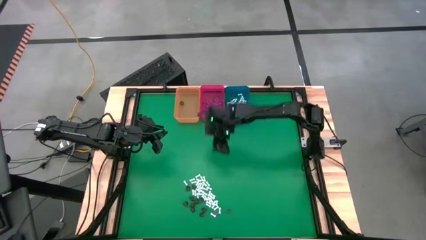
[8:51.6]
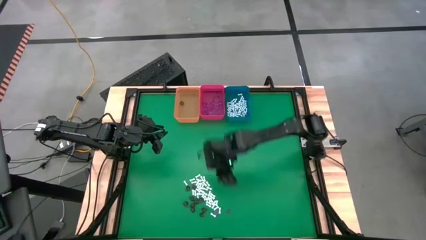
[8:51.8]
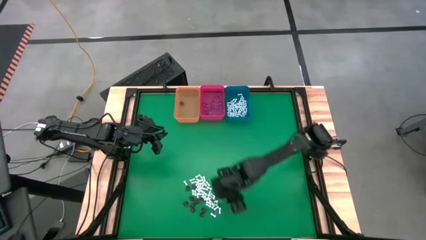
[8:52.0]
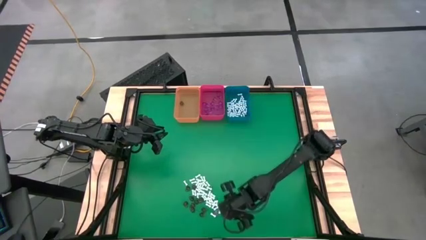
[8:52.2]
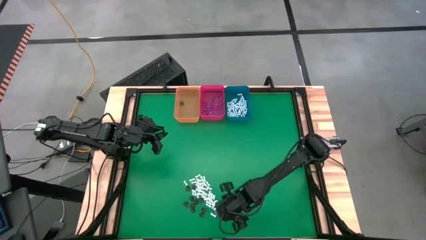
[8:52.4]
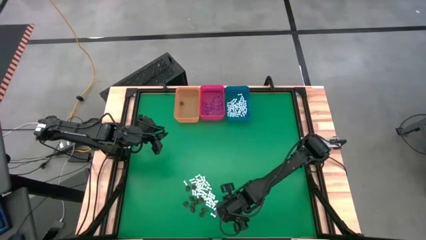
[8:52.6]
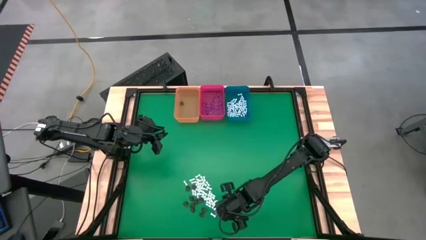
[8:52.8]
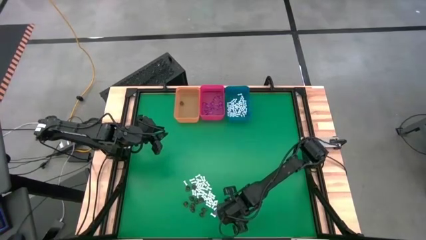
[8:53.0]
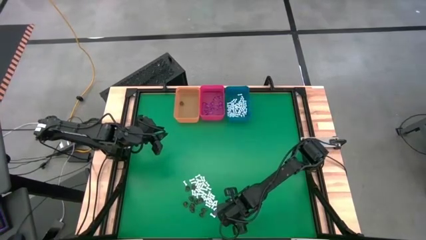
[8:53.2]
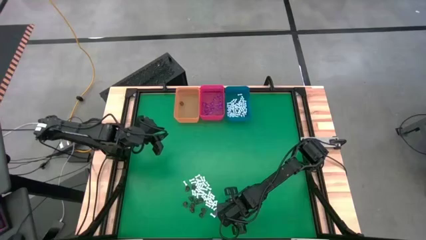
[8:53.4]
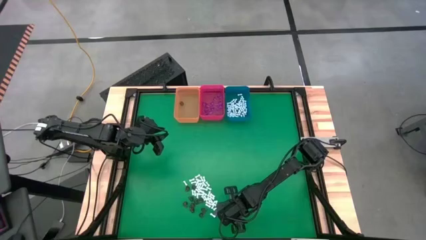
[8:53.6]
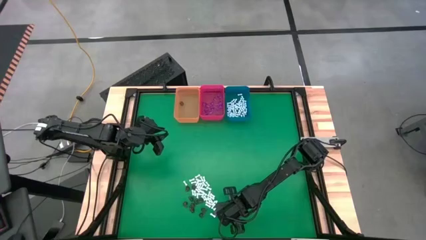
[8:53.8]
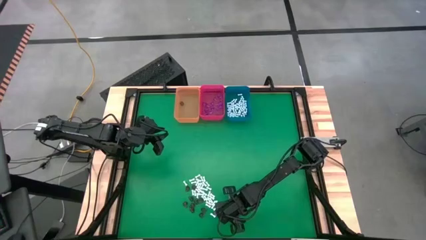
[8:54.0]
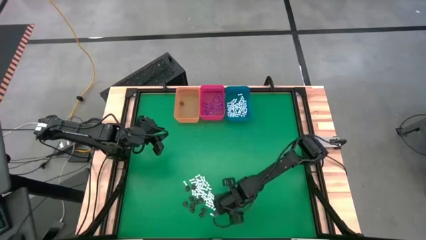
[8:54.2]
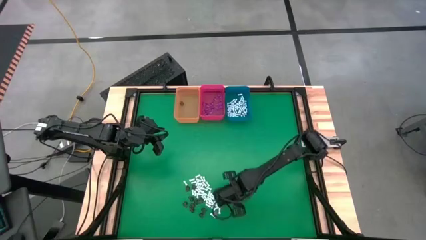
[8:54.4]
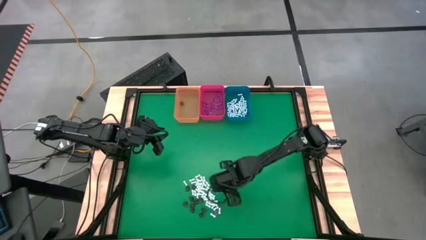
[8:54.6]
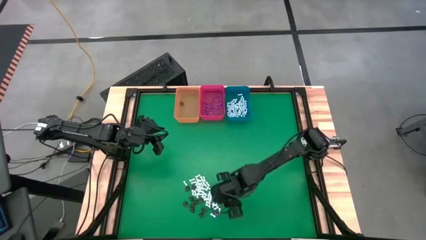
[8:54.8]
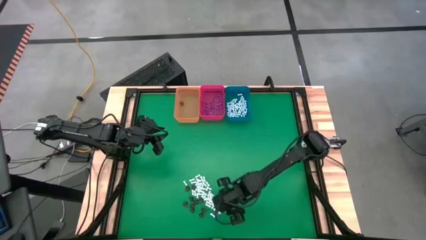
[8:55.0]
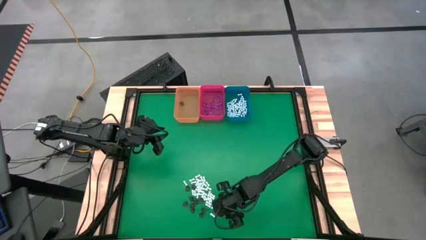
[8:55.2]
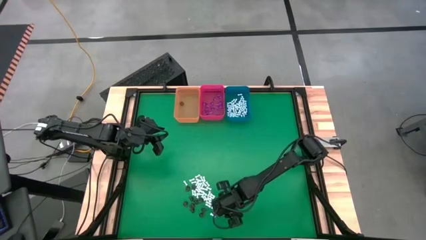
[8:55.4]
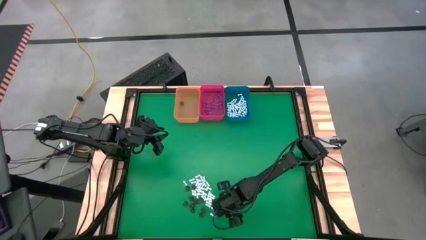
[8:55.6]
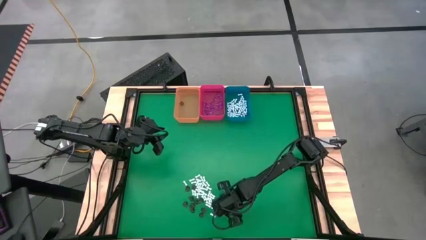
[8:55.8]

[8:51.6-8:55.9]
Task: Sort Halloween decoration
Put the right violet witch hat toy into the red bin

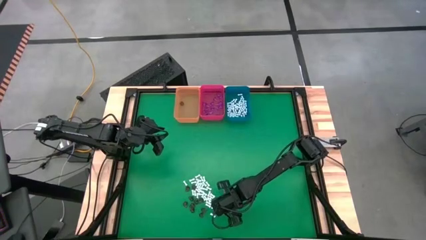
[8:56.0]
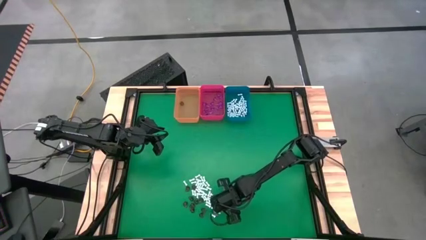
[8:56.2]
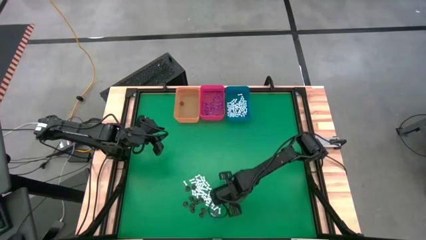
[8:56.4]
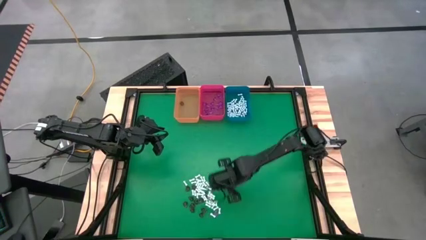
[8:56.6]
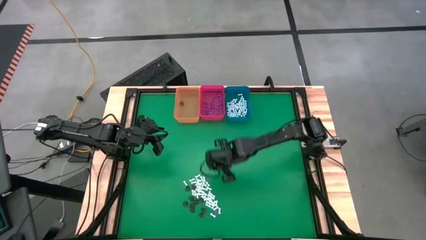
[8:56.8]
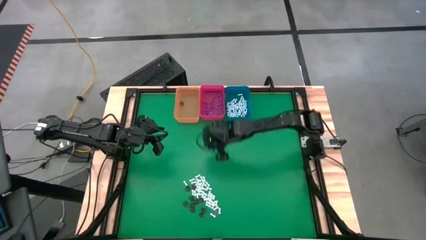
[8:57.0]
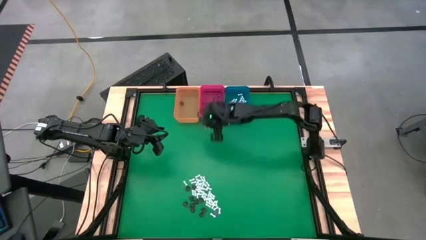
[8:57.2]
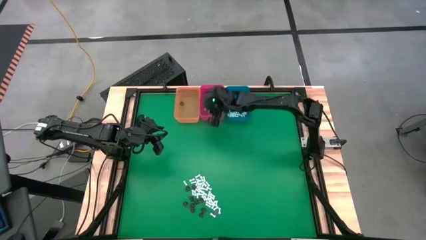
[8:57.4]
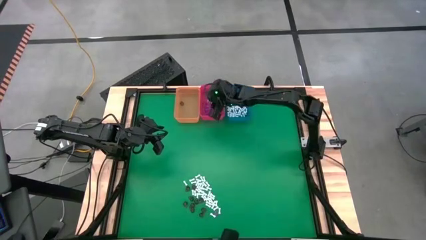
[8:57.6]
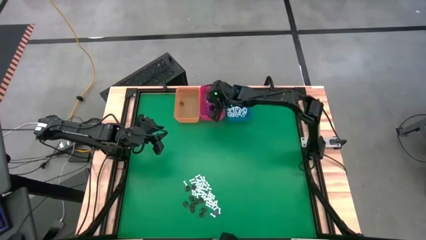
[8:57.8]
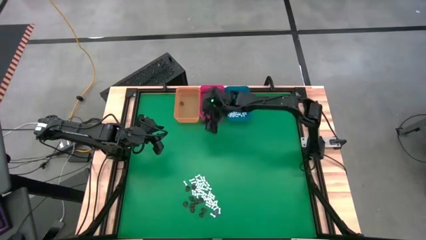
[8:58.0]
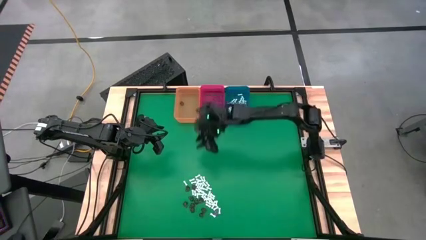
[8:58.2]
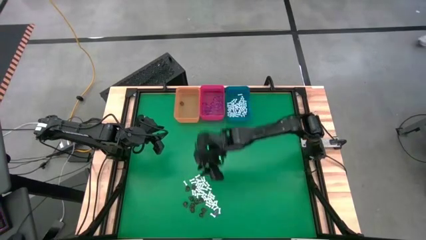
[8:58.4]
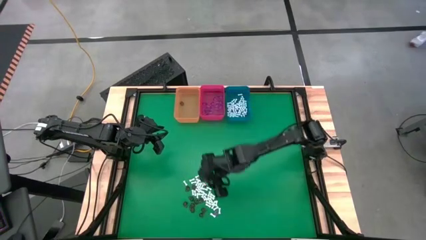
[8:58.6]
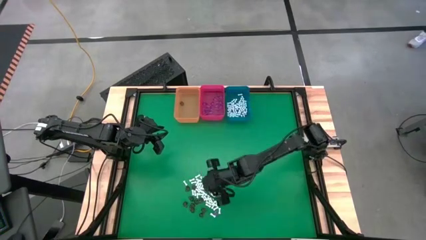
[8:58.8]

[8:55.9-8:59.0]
Put the right violet witch hat toy into the red bin

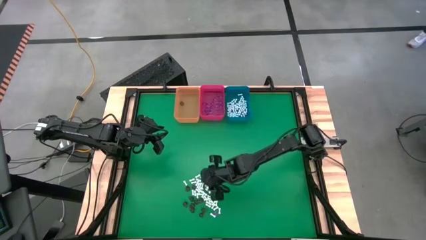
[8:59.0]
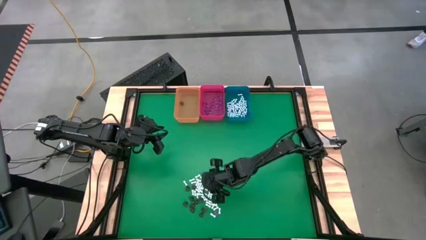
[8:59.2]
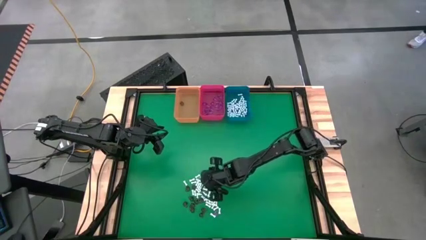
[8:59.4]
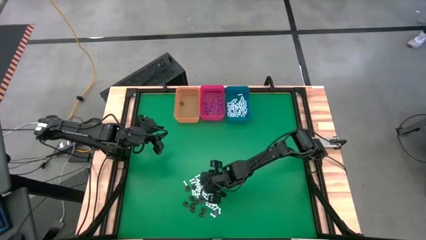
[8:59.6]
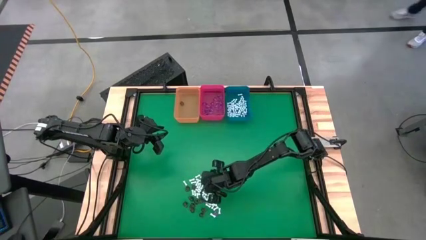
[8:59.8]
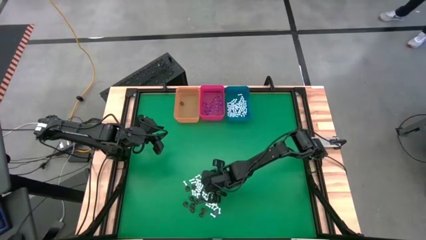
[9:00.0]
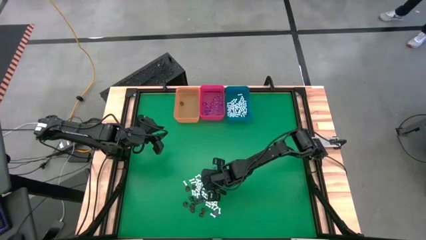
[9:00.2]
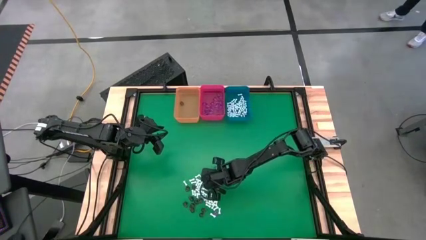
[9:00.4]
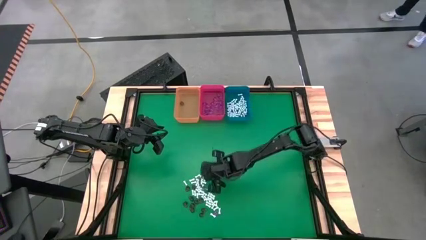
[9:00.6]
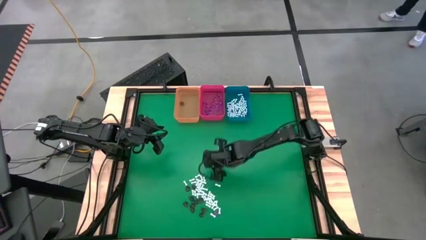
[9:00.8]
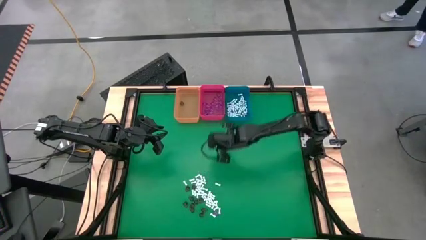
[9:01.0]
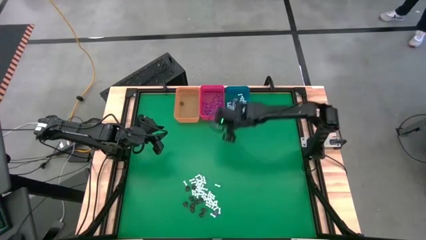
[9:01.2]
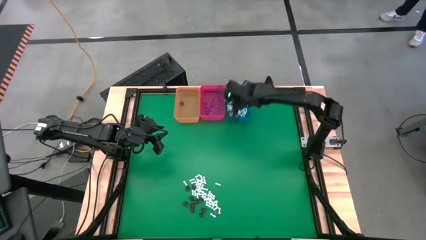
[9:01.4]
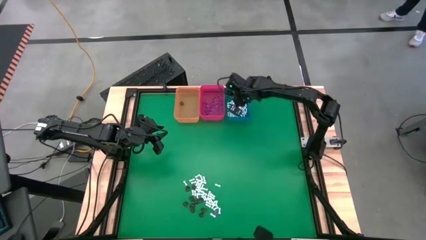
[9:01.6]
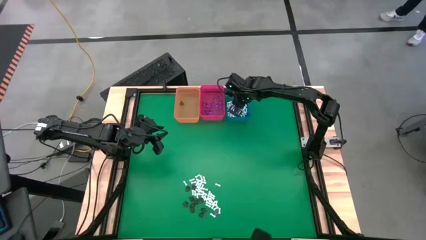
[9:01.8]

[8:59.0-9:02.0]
Put the white bone toy into the blue bin

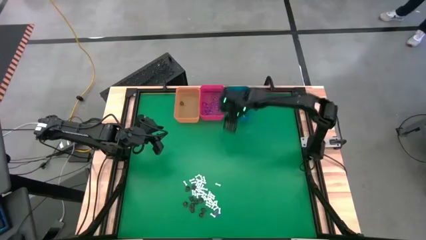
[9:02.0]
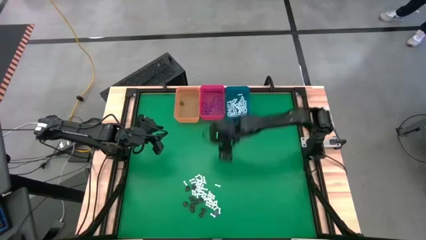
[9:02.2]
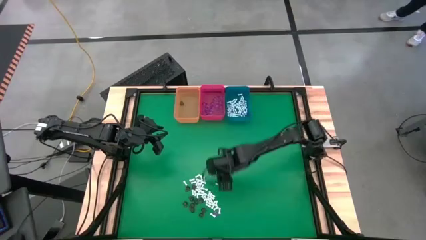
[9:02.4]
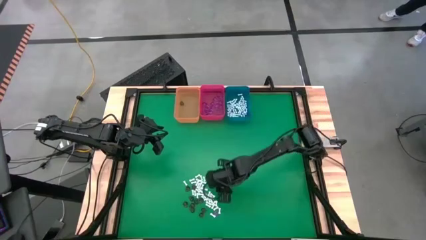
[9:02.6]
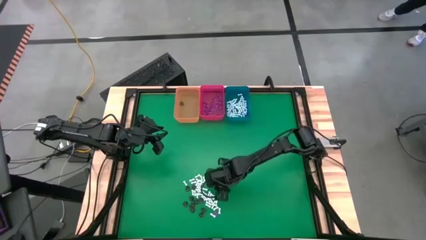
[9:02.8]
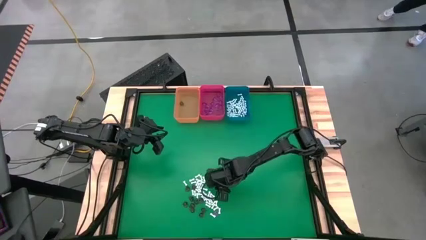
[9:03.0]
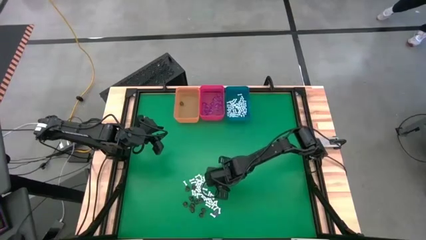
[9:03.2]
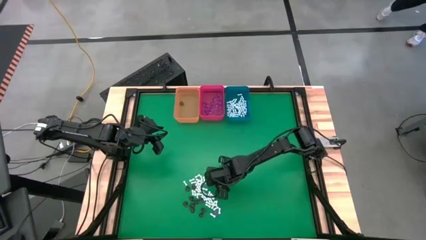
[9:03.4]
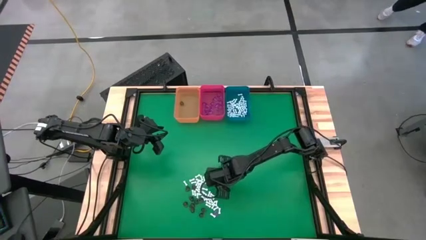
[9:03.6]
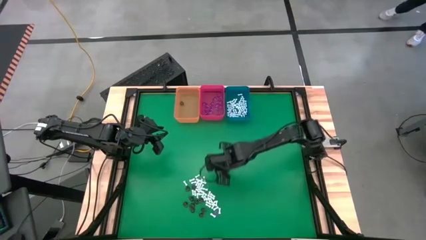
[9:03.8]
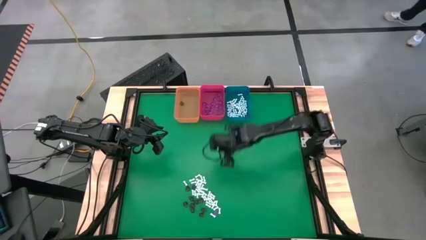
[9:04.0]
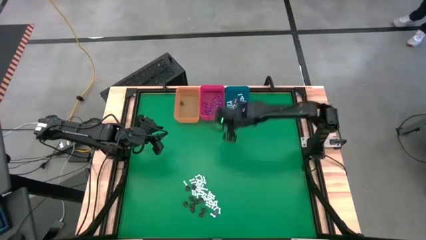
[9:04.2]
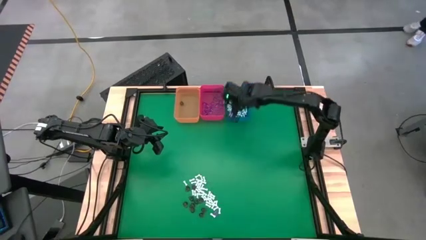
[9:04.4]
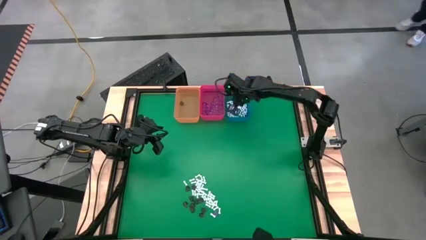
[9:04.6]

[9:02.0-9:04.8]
Put the white bone toy into the blue bin

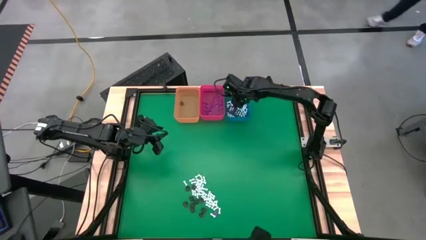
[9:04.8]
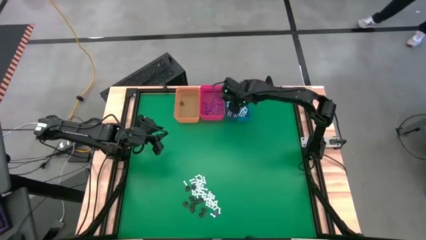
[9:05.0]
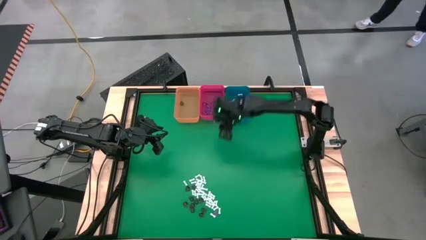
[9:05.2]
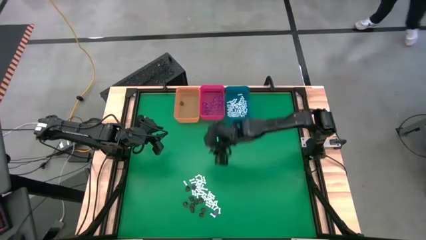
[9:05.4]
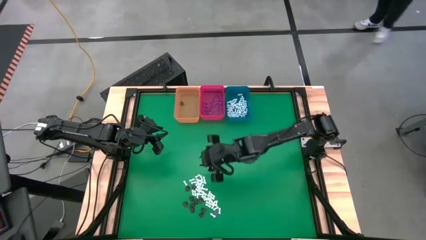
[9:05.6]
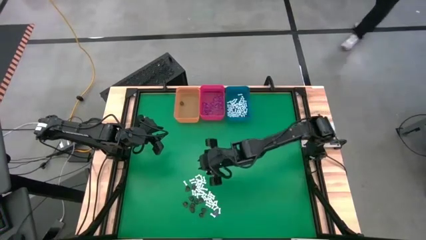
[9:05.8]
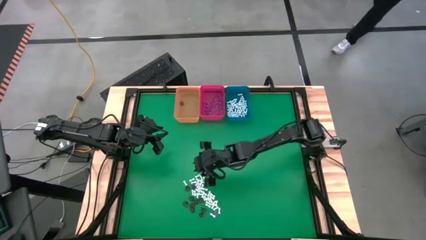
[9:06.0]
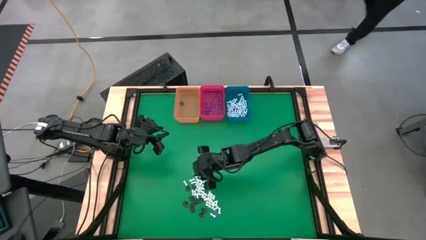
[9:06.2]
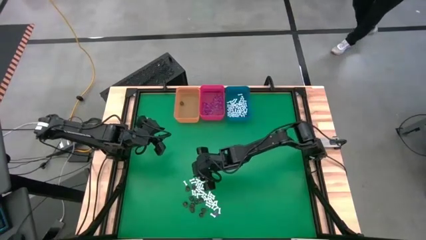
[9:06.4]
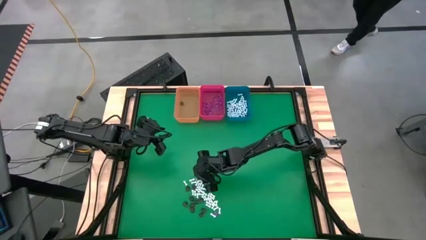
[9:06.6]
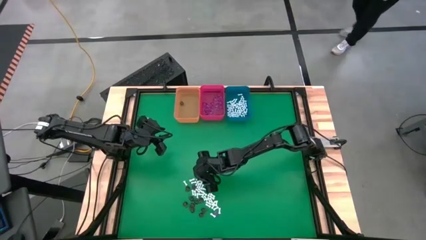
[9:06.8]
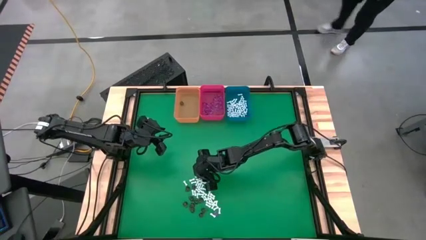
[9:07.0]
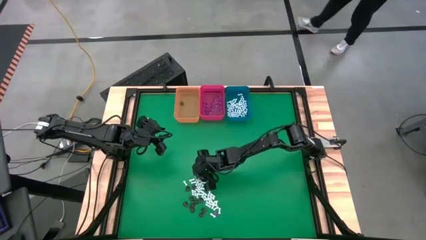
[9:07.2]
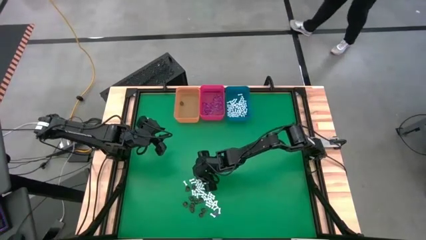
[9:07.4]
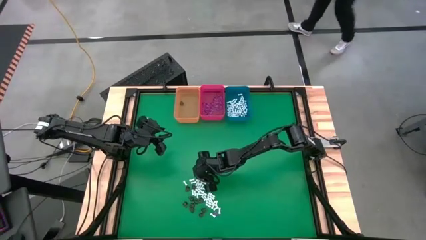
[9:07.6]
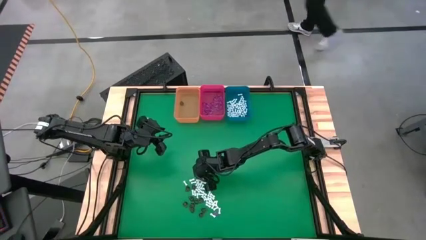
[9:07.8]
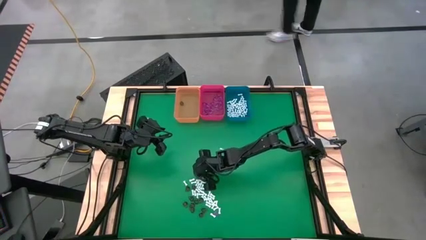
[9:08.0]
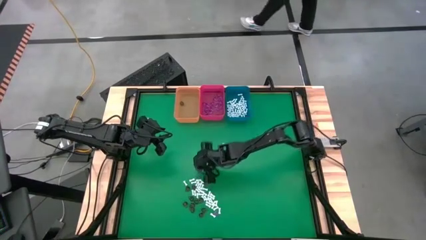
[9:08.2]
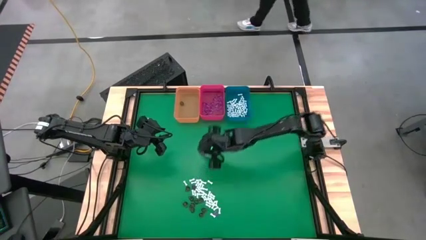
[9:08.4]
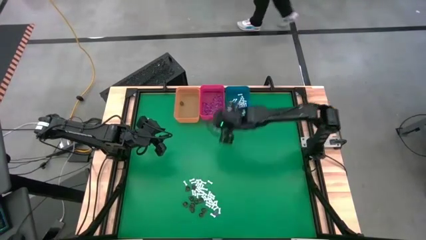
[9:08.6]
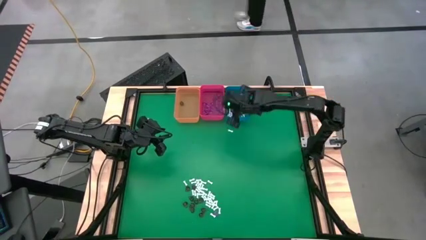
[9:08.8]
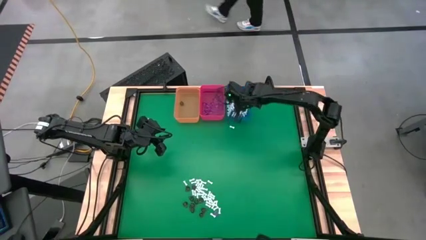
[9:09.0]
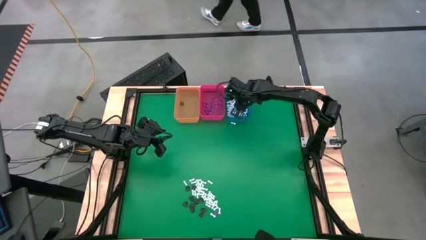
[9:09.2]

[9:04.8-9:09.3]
Put the white bone toy into the blue bin
